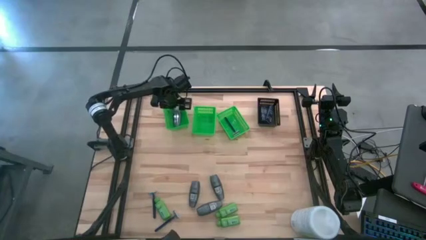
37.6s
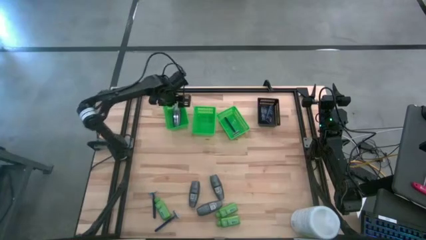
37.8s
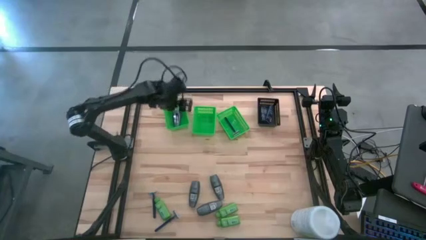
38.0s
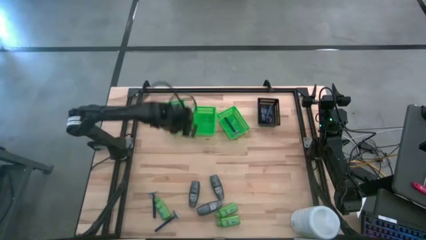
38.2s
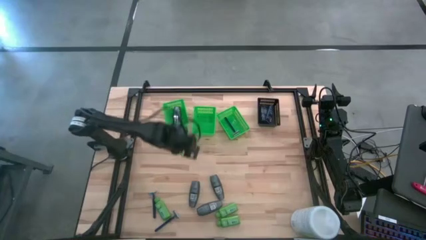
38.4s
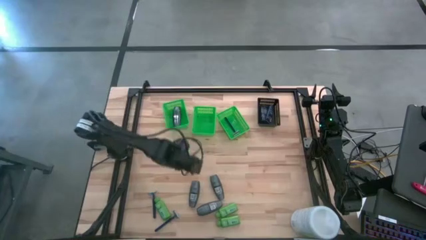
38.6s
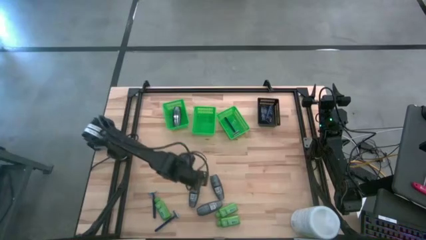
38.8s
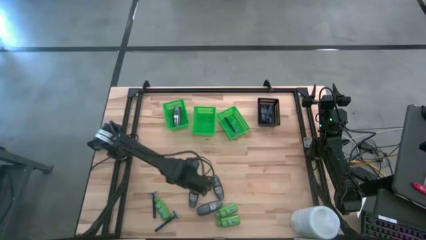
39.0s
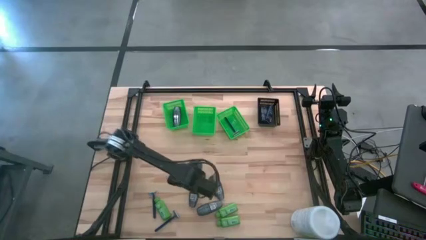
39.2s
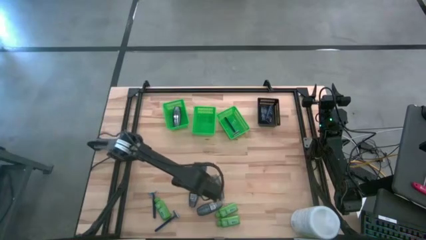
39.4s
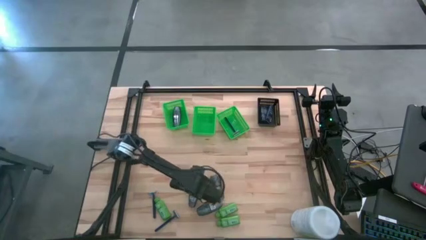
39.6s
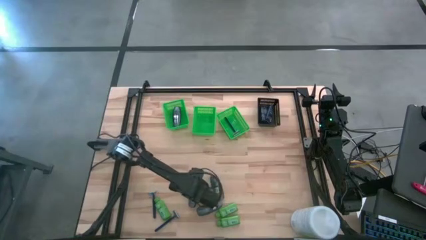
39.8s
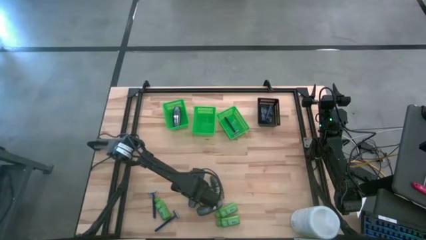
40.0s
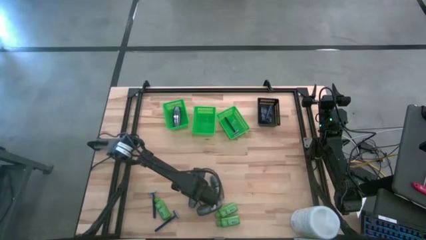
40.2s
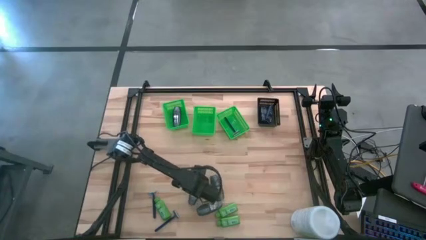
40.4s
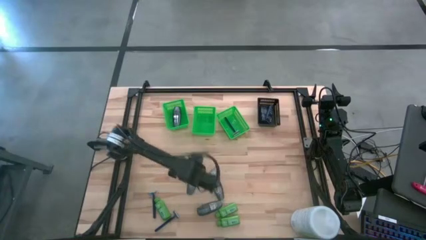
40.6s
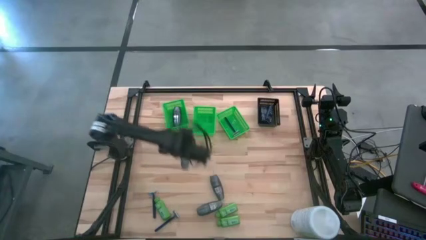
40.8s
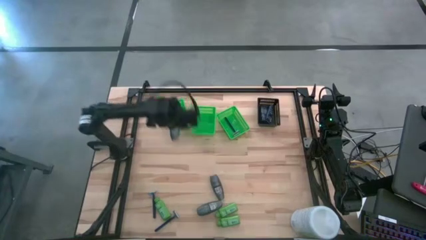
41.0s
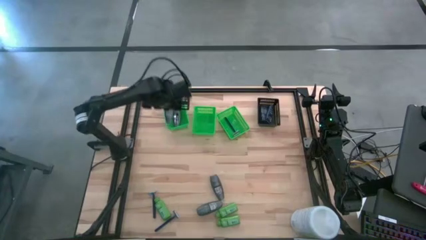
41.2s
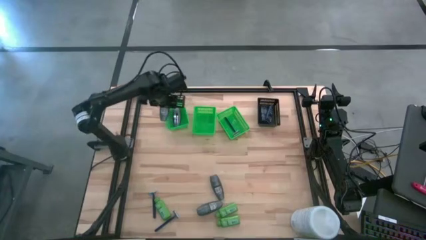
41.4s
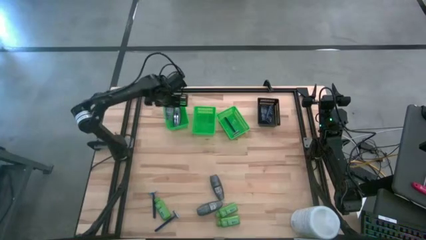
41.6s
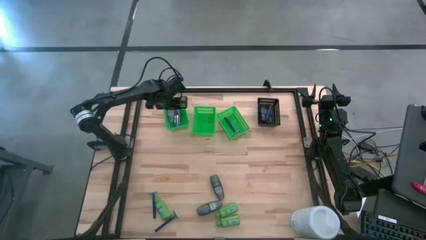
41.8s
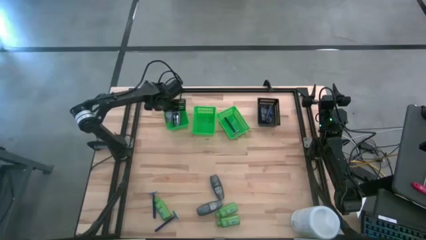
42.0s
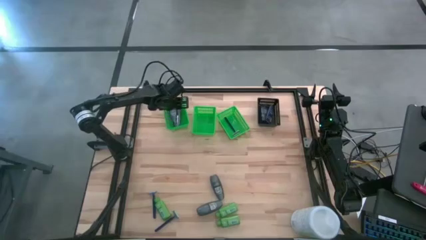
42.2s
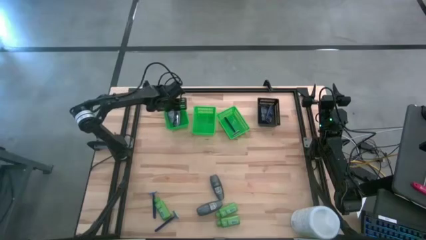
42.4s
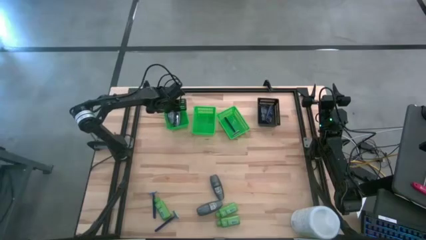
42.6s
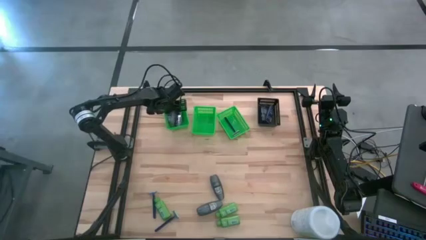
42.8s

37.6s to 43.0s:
Task: Pick & Place Travel size toiletries
Put the deodorant into the left green bin

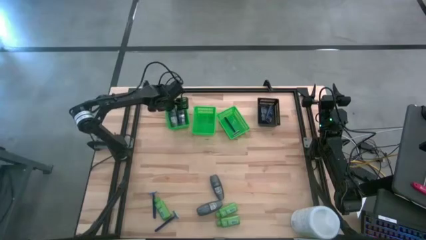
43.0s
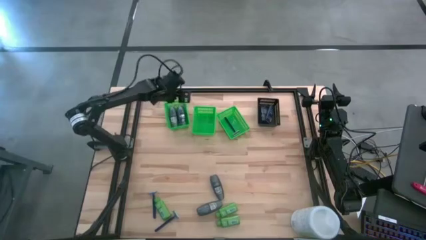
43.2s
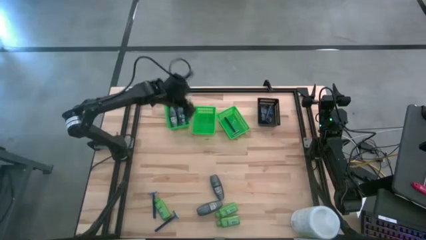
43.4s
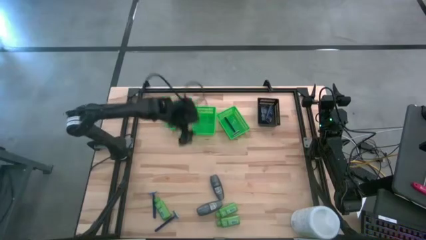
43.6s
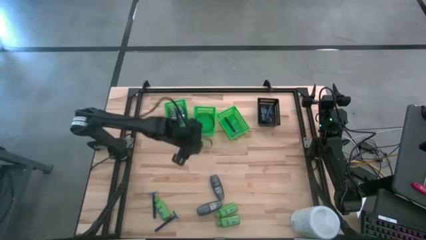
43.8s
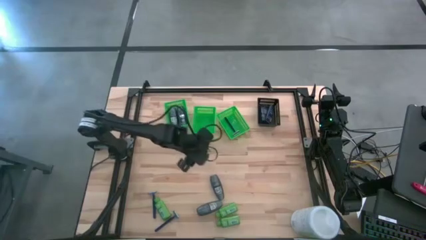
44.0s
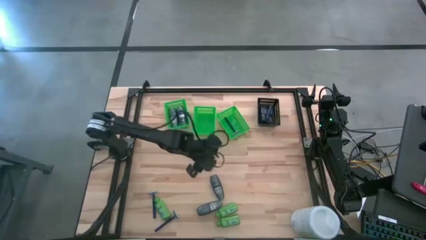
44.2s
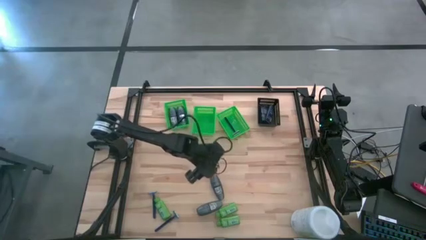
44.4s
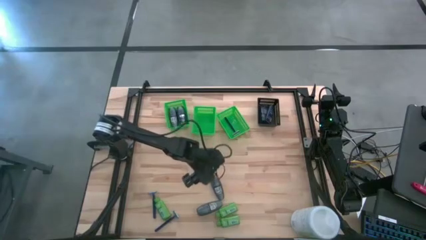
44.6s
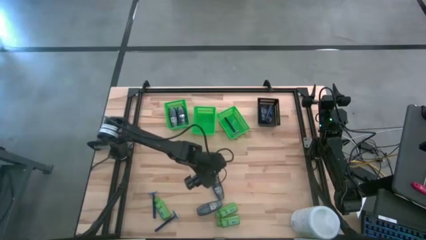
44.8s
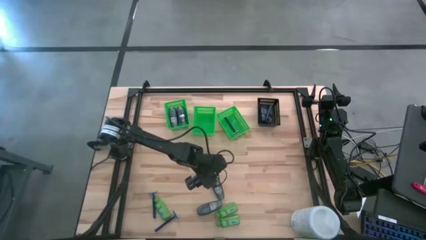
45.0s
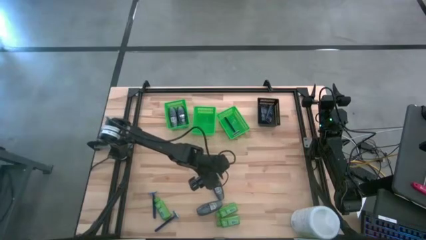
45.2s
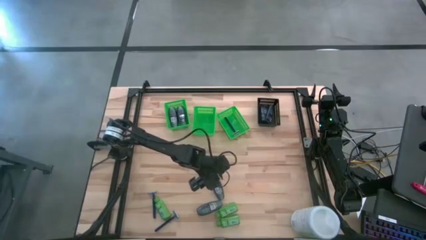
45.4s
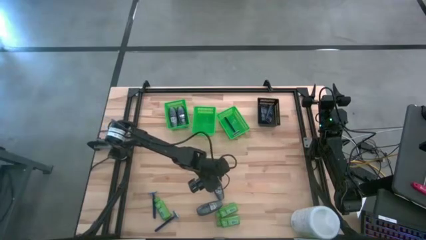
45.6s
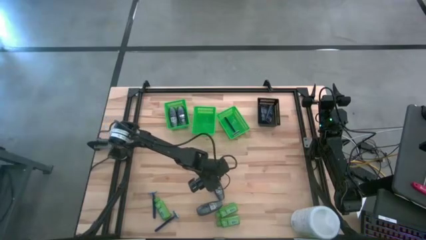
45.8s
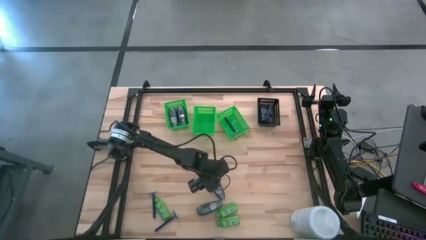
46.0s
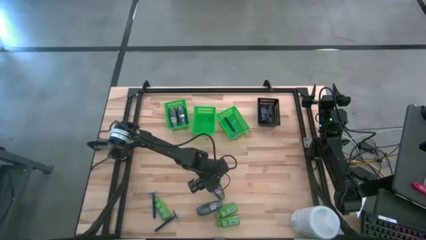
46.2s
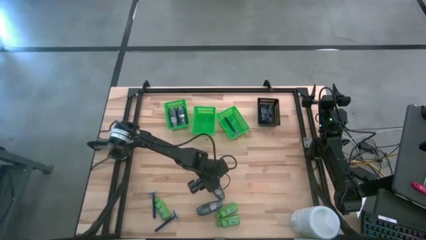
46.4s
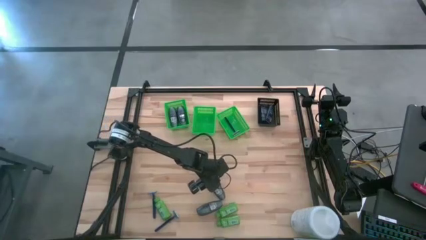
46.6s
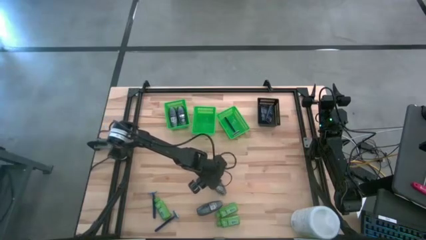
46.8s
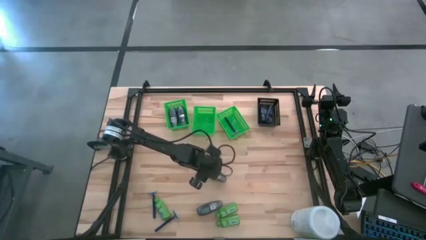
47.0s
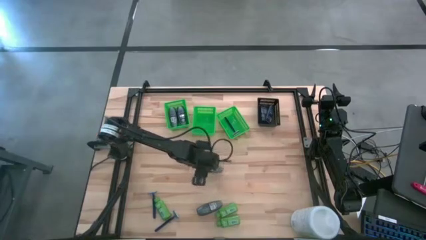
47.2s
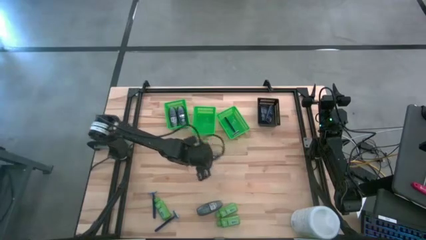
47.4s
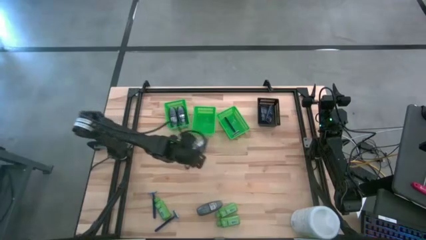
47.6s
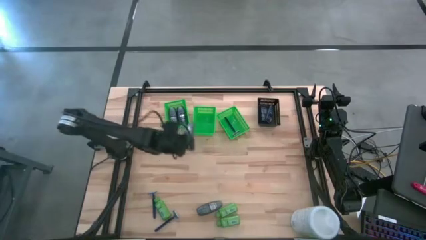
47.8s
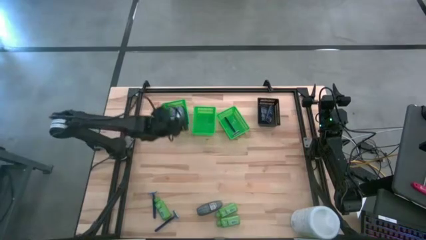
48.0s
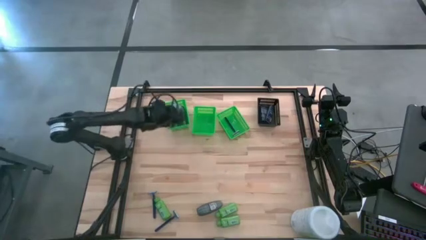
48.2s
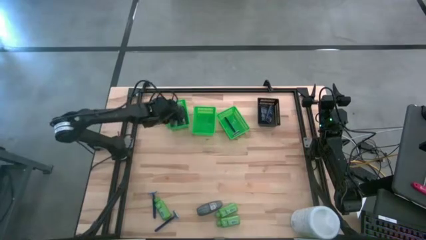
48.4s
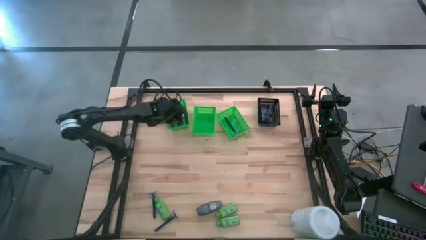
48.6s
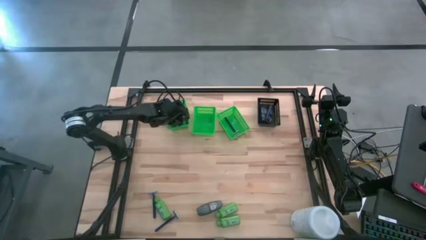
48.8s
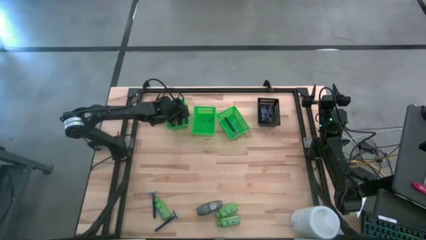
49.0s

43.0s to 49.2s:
Put the deodorant into the left green bin

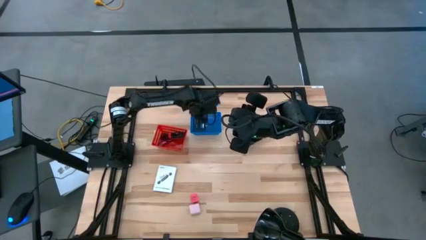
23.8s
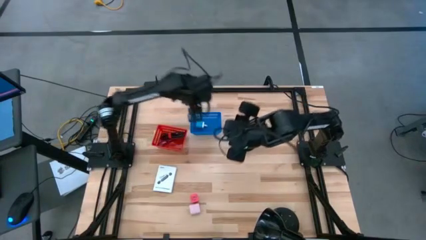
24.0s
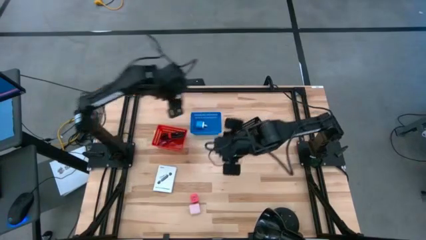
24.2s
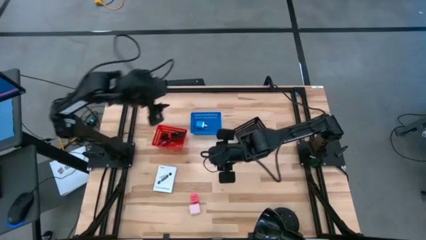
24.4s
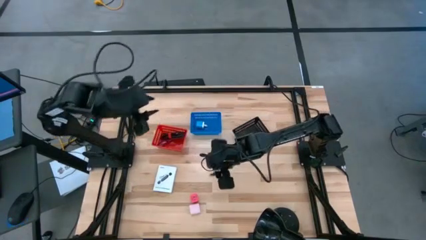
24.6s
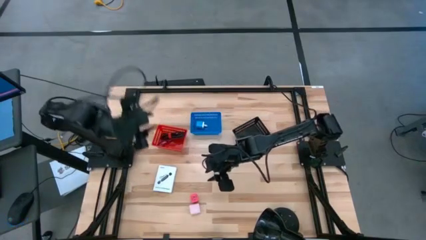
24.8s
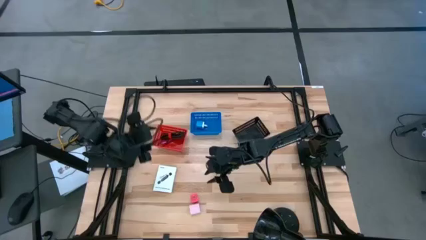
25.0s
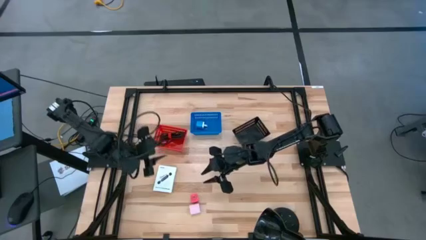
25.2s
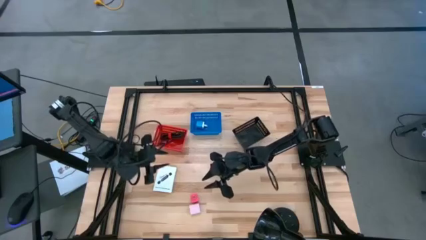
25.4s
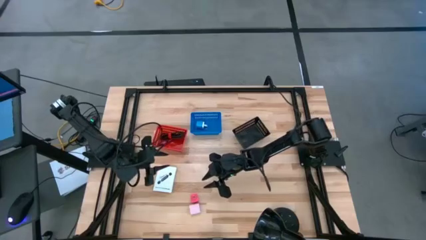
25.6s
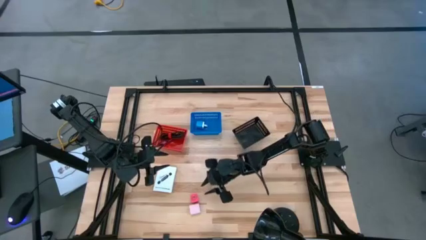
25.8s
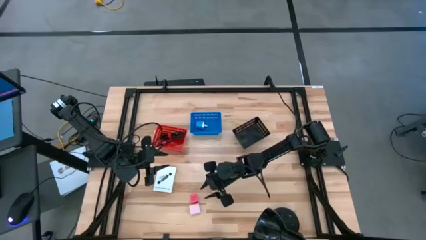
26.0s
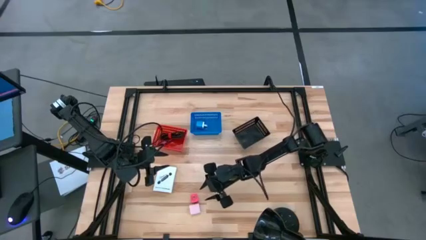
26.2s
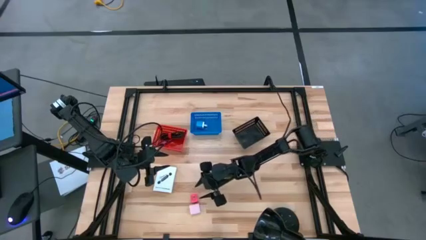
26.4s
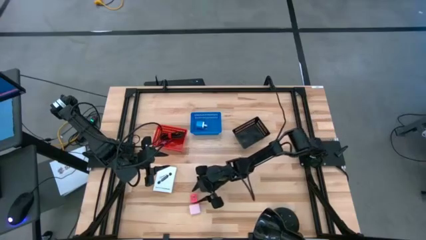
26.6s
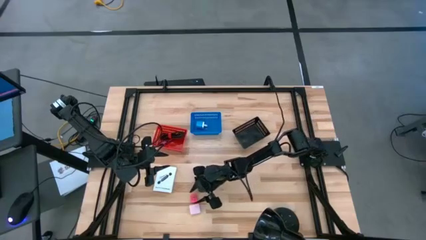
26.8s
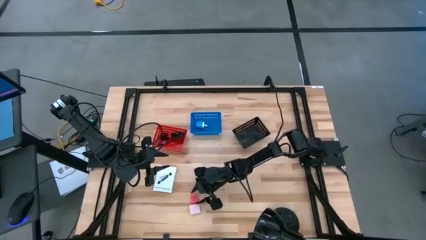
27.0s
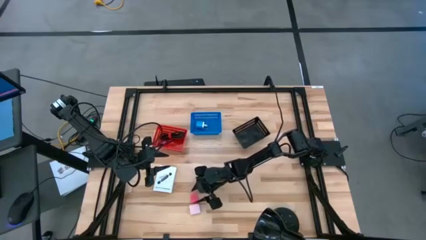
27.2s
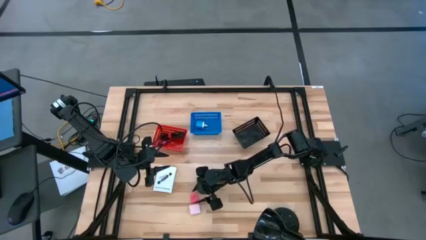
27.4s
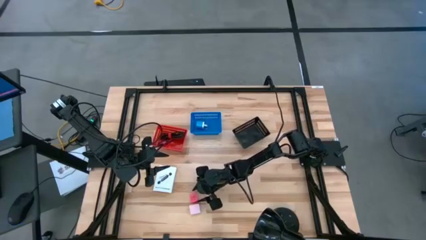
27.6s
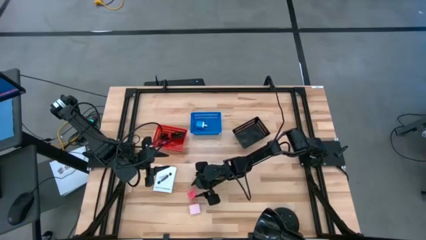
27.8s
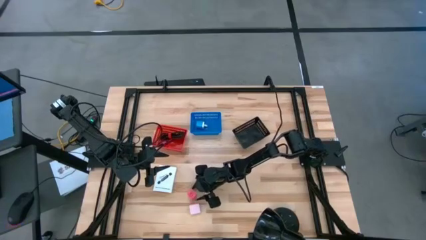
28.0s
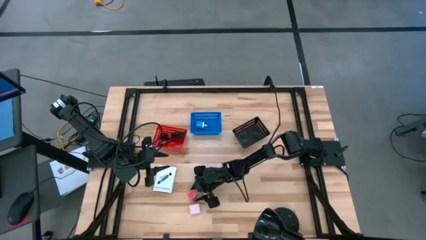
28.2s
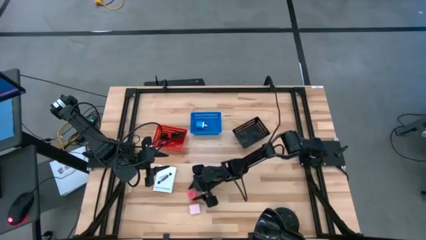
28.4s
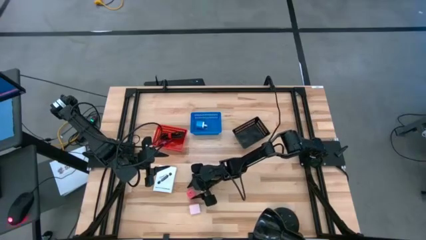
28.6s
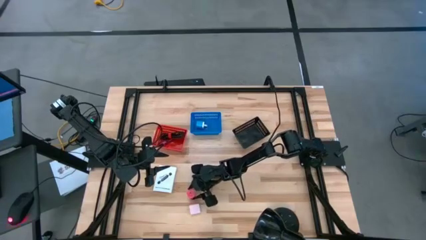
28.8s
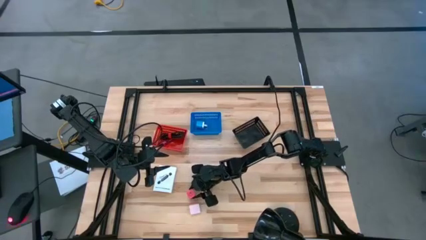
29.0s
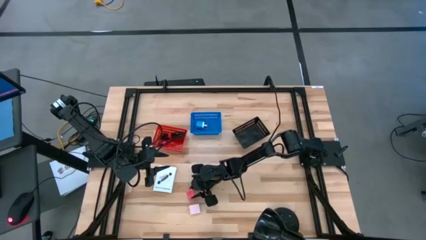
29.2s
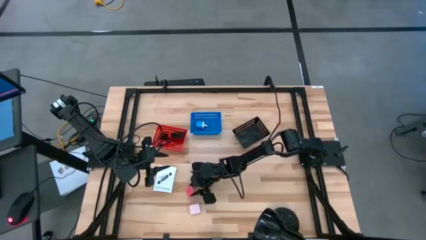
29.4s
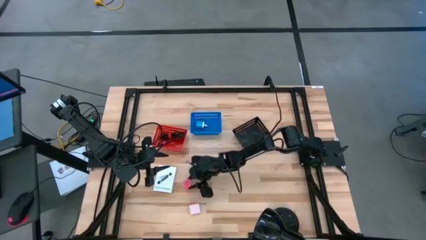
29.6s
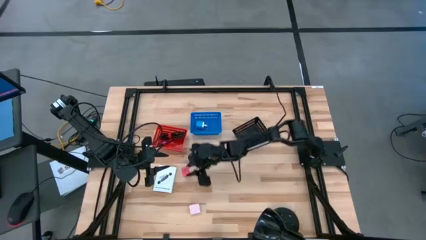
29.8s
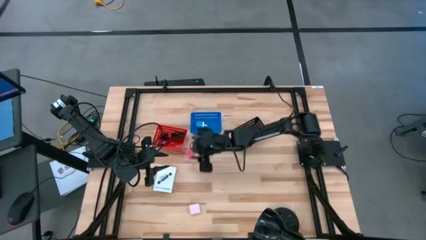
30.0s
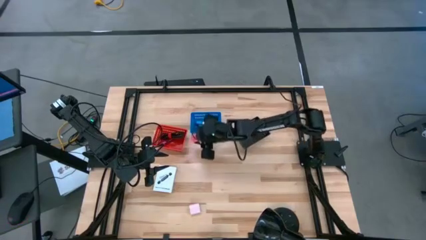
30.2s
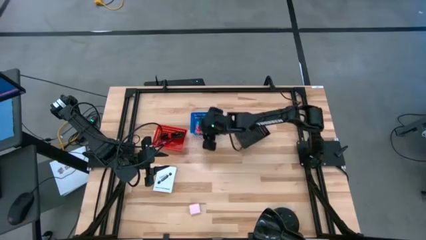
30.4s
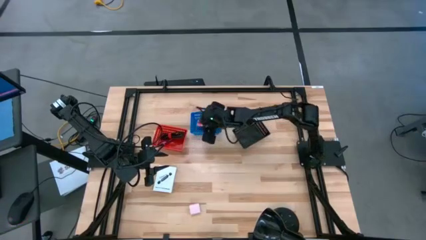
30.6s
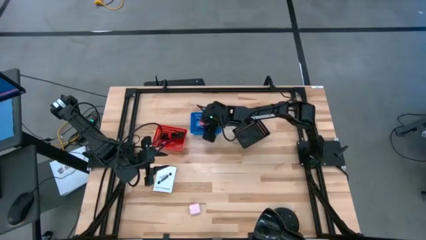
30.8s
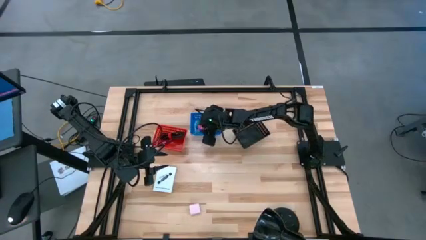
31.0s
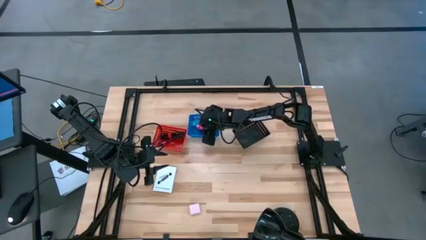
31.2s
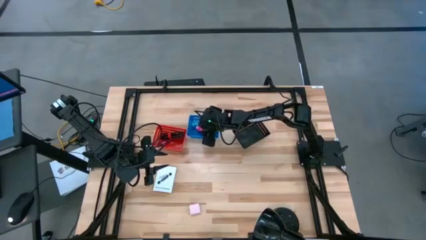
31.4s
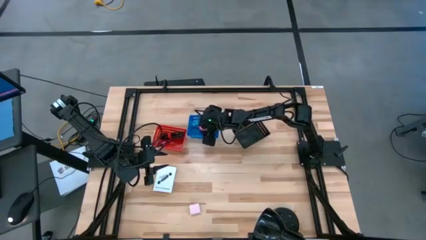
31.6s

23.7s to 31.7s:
Task: Pick and place items into bin
Put the pink charger adapter into the blue bin
